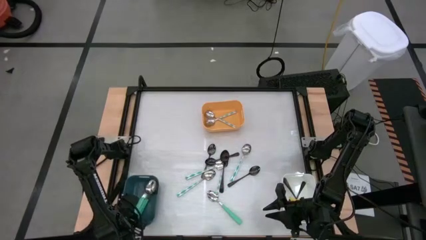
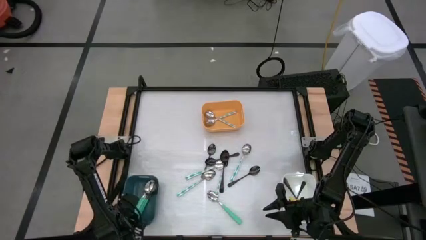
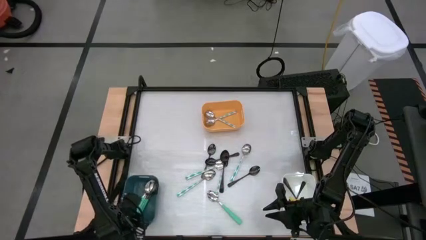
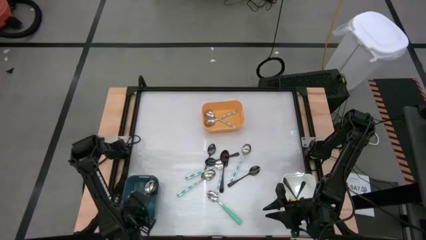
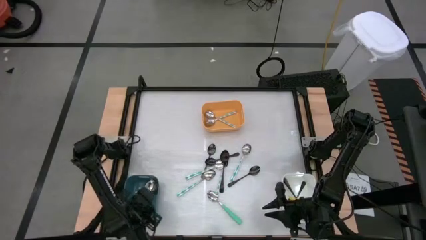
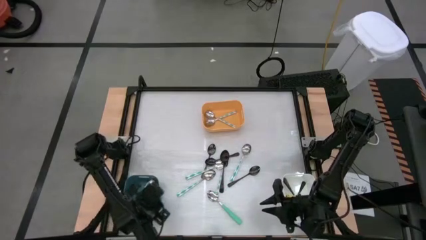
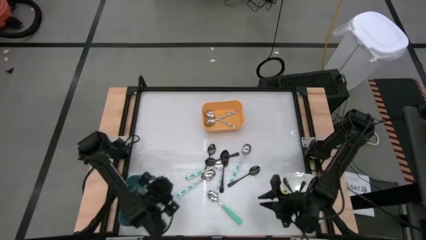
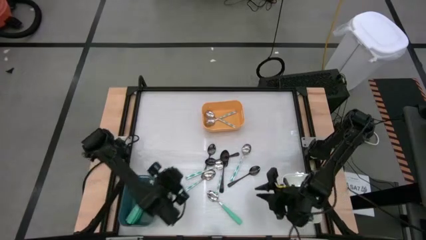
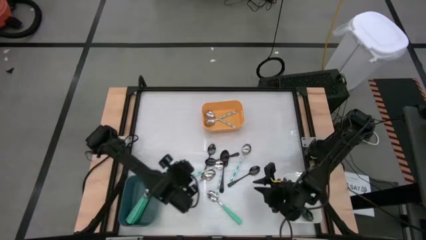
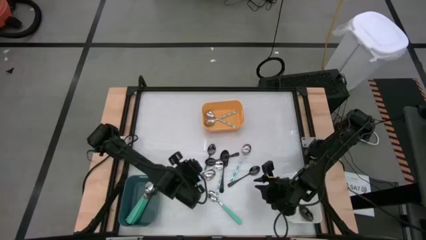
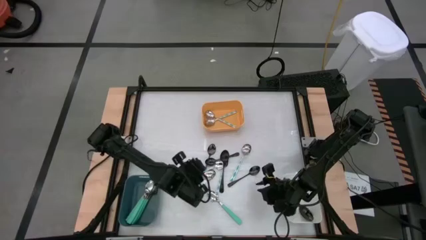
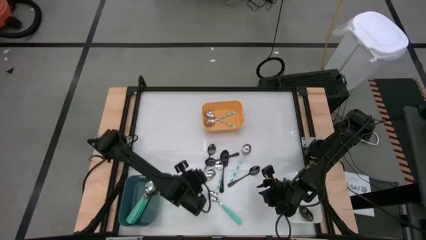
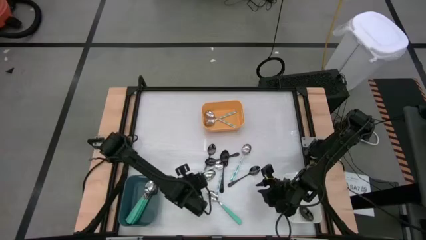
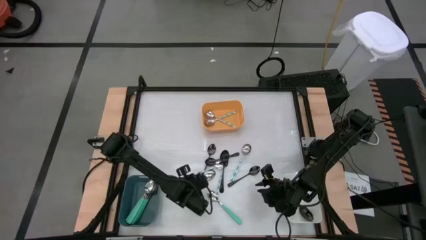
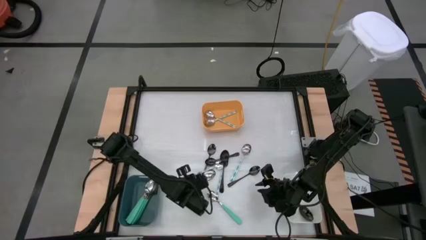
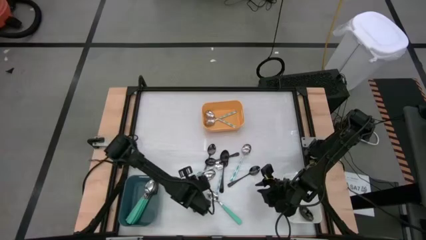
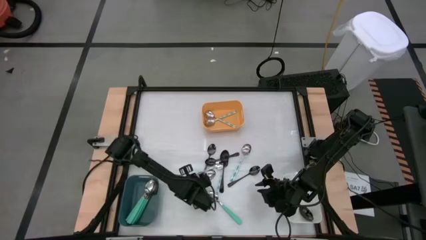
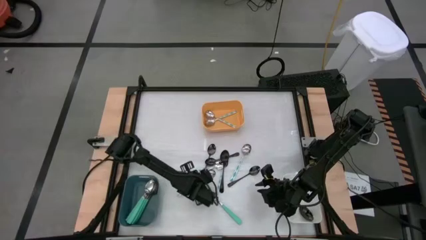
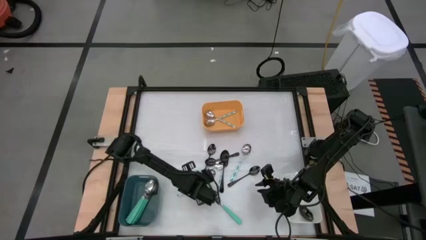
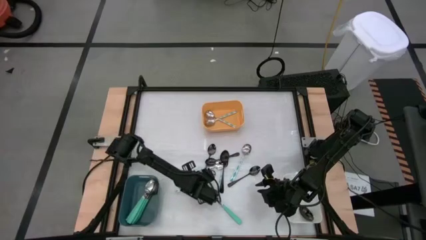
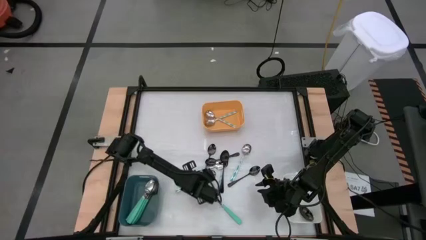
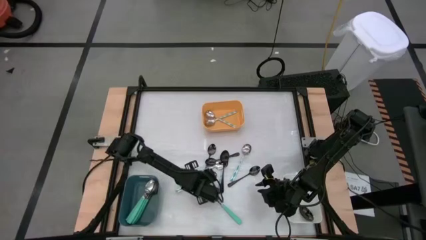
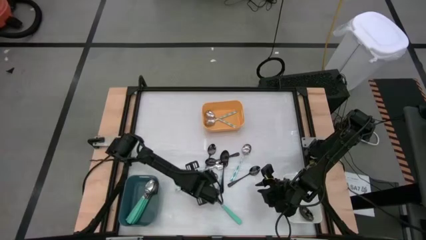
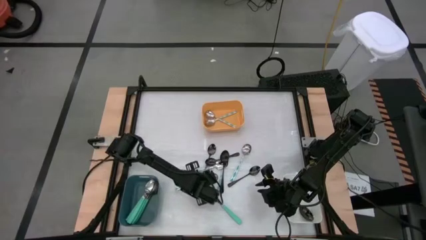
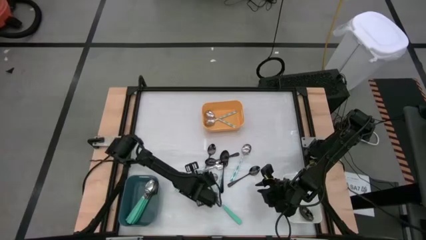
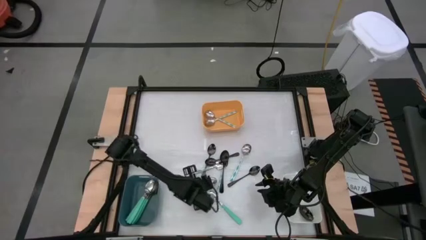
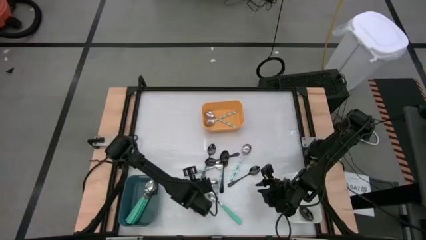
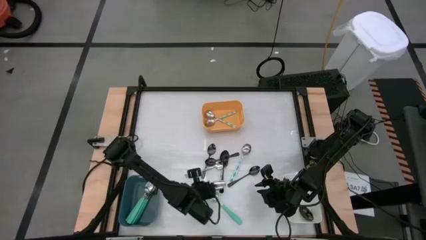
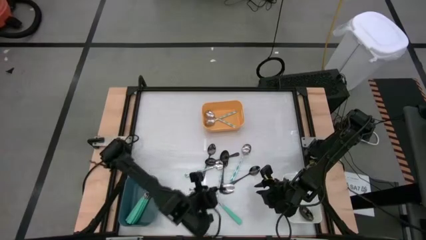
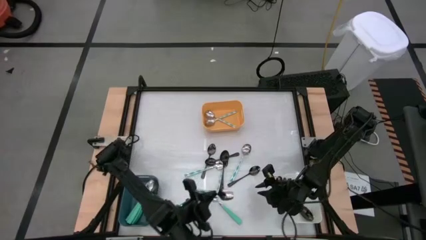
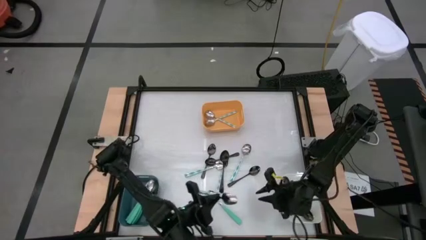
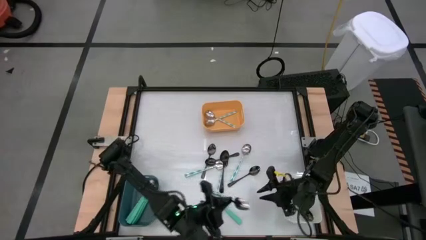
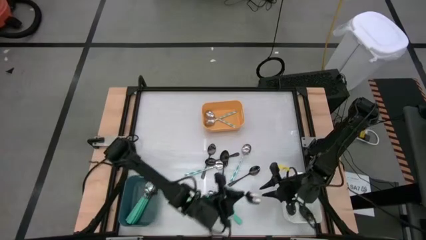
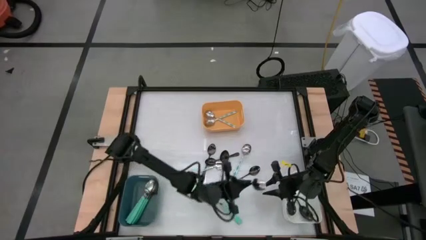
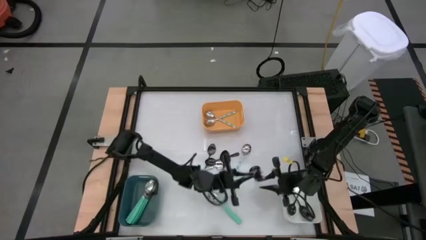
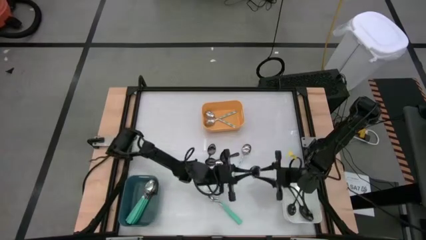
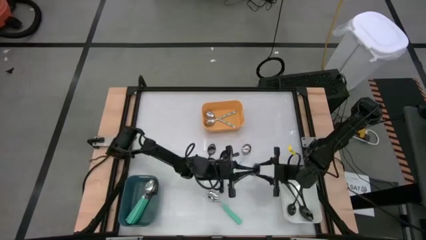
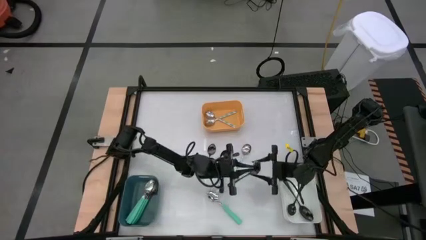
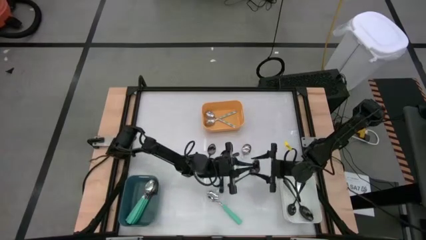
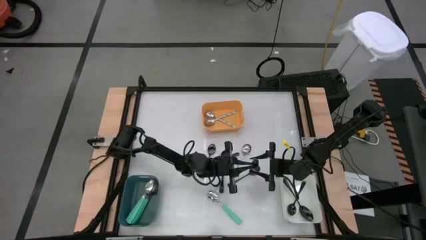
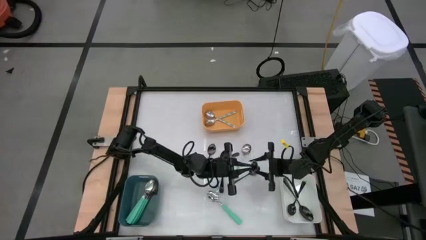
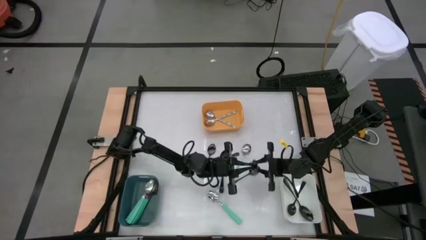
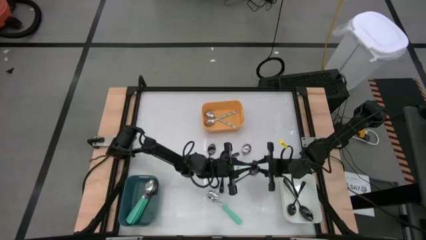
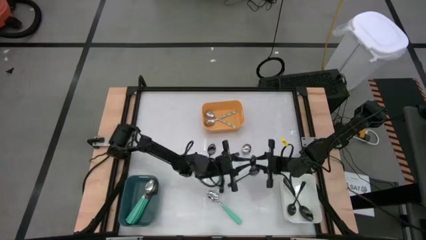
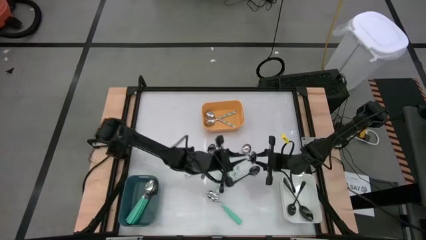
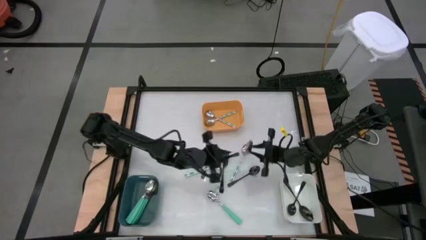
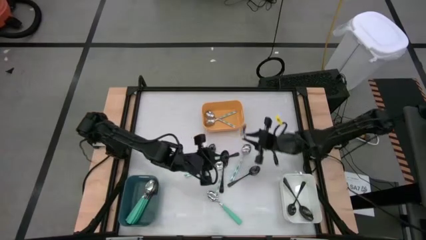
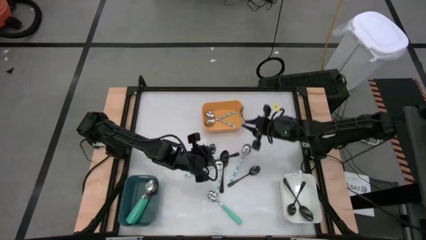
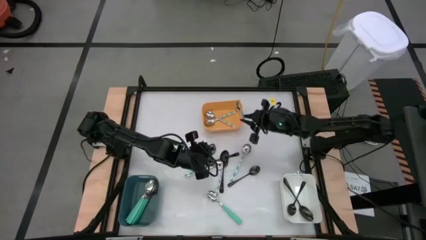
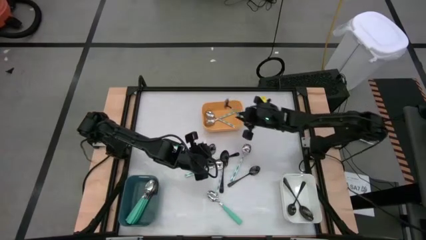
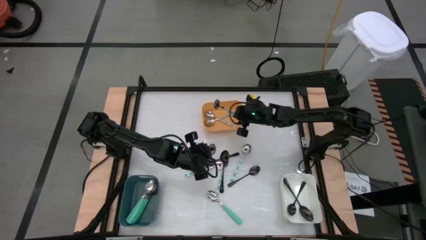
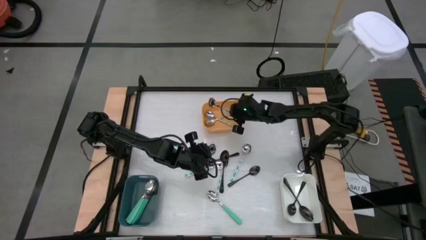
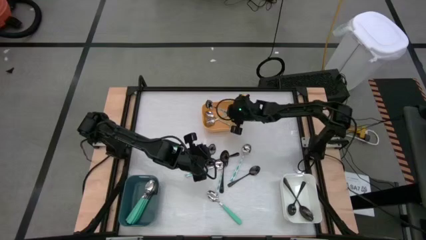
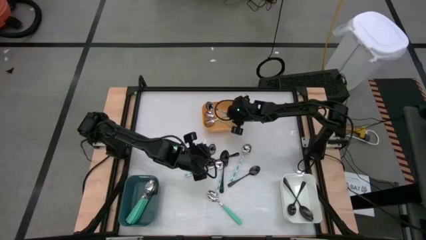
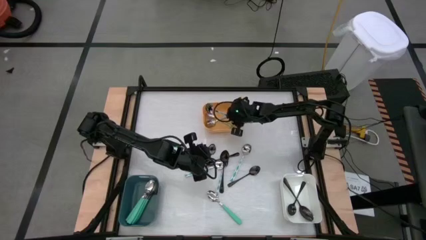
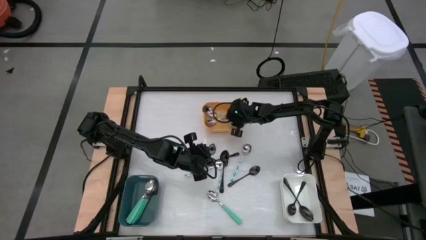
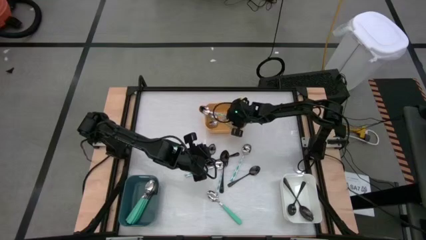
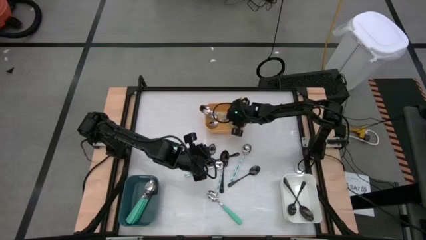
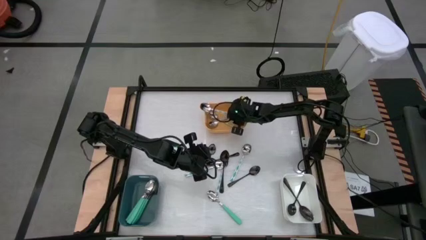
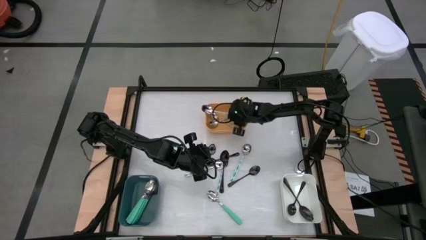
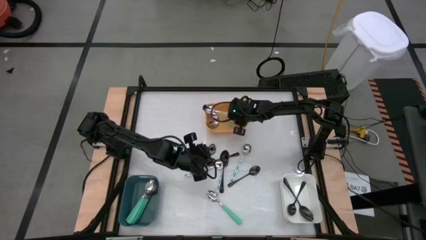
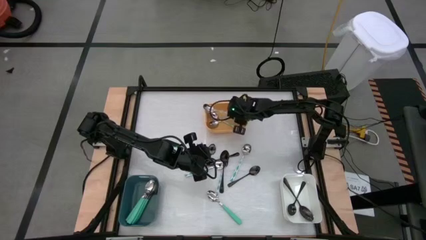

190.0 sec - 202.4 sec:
Task: Sort silverware by color (type)
Put the white patterned spoon into the yellow bin

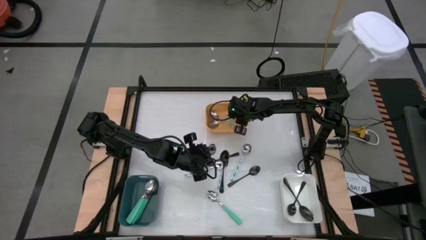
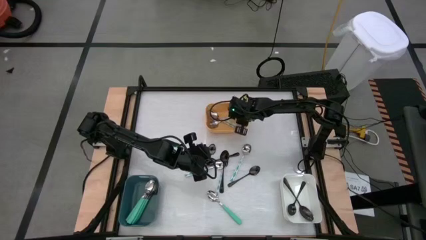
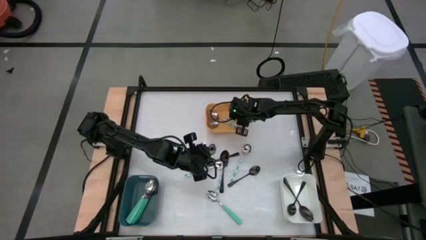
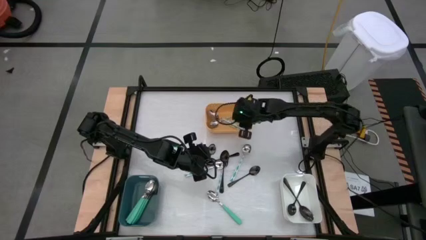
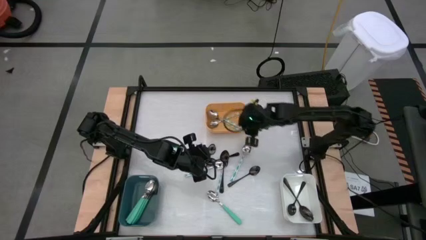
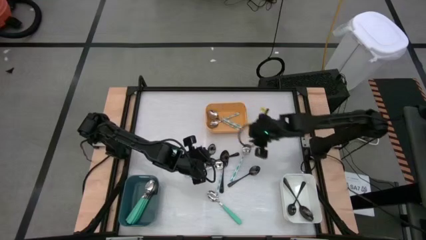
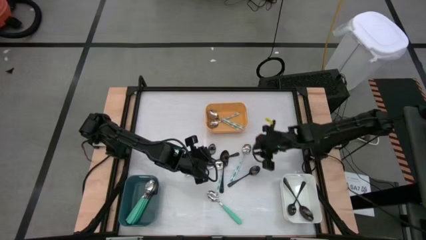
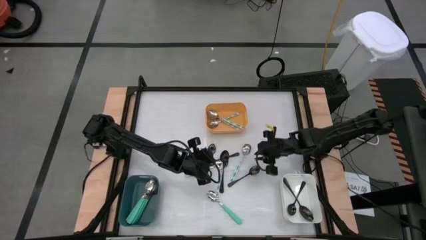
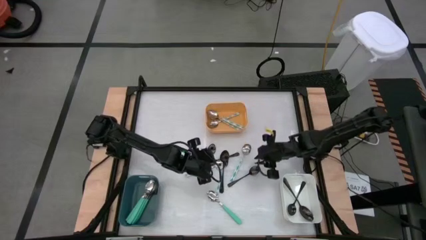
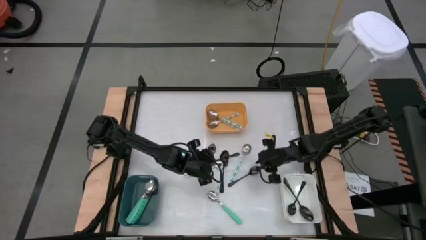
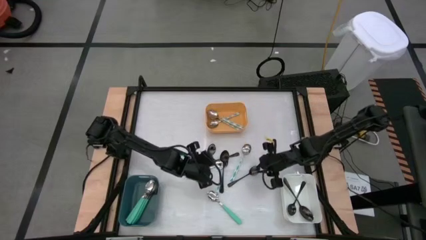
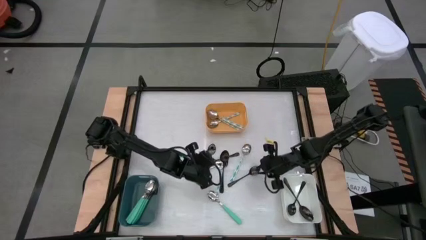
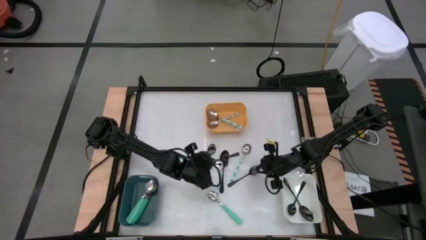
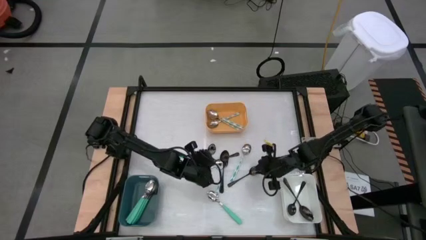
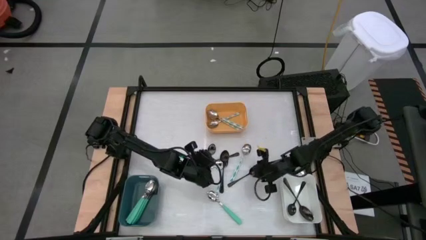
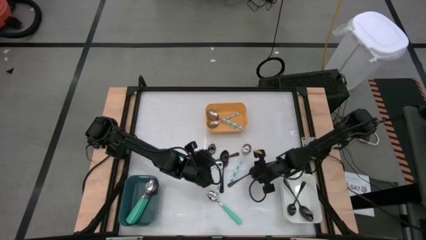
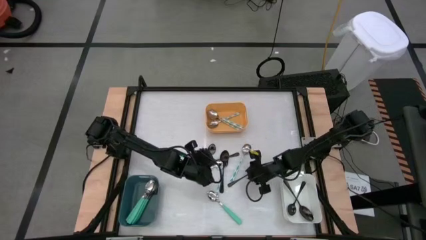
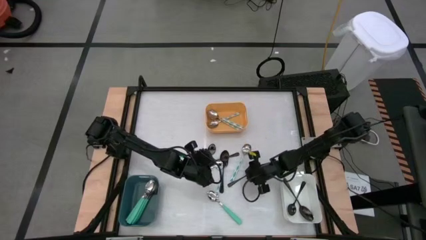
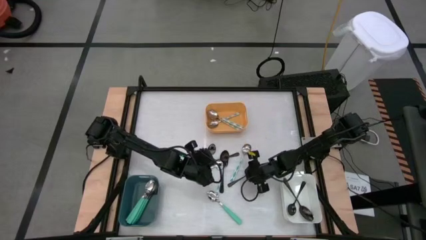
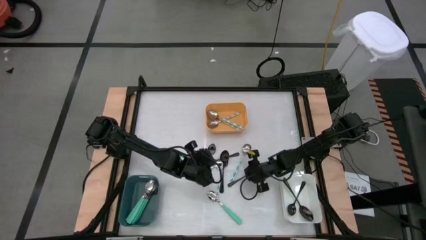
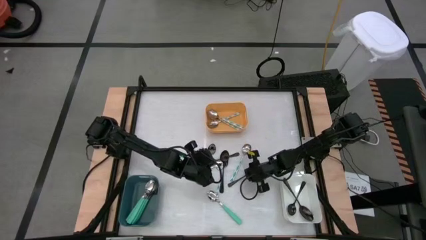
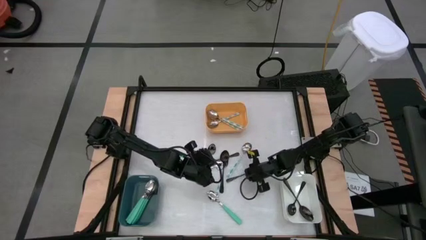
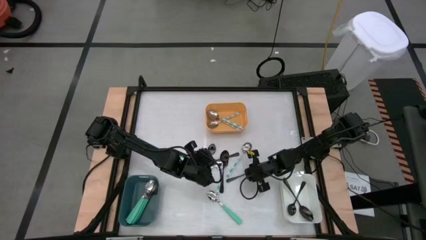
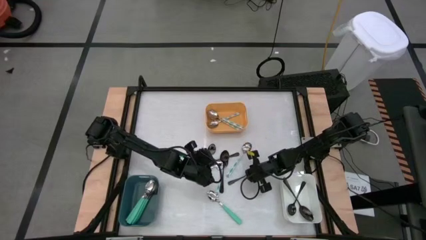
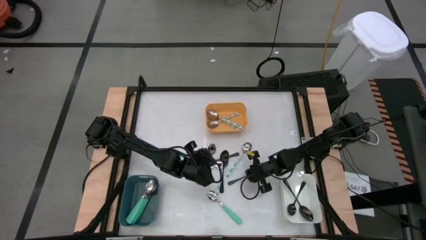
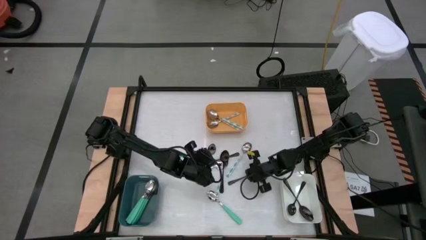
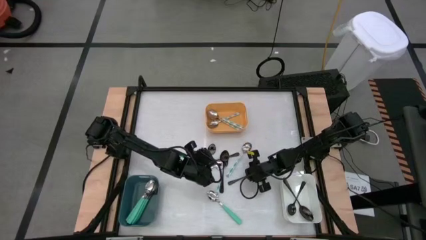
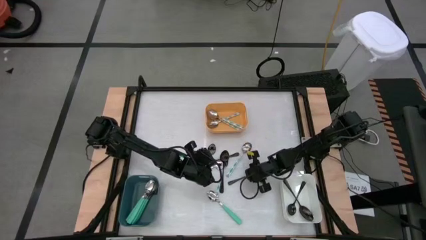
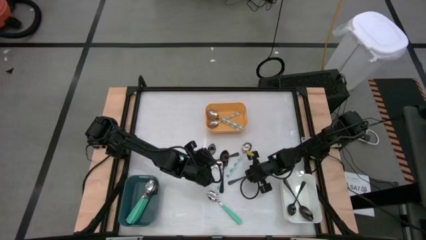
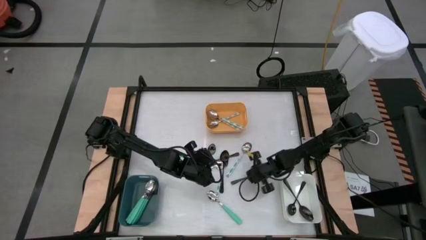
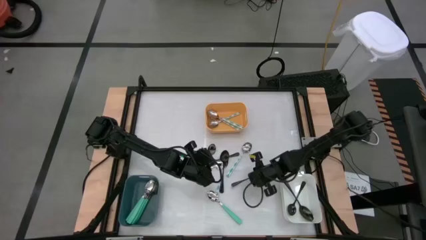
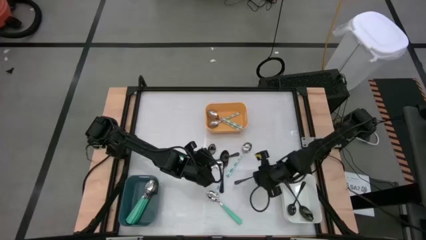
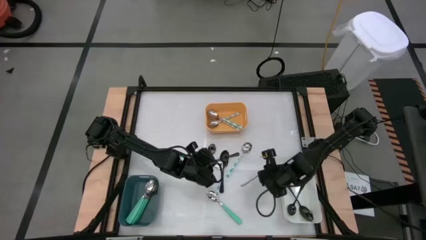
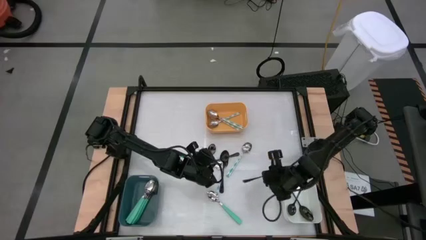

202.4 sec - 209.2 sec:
Put the black spoon into the white bin
